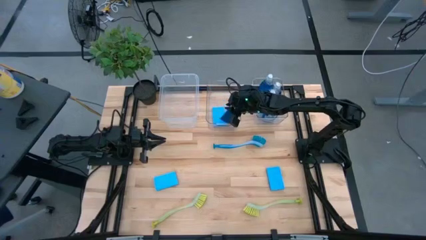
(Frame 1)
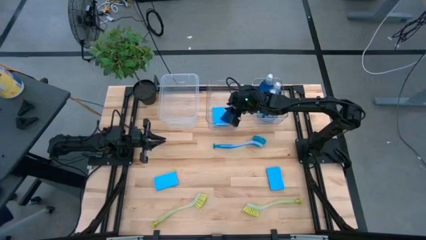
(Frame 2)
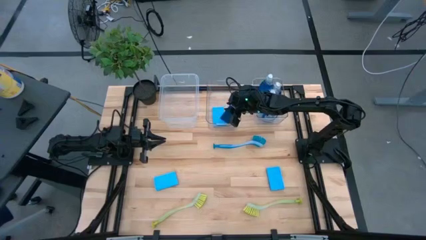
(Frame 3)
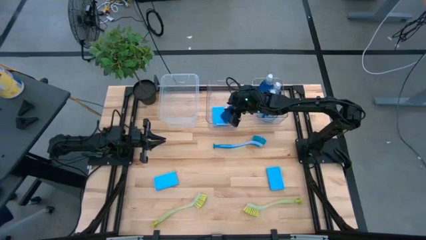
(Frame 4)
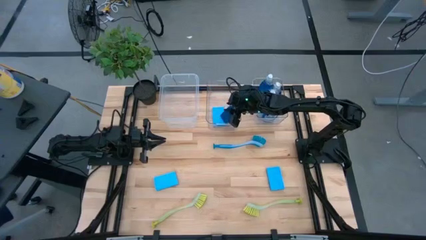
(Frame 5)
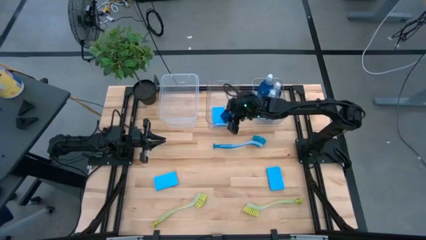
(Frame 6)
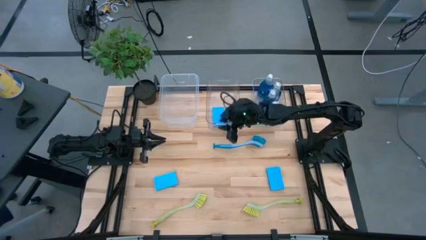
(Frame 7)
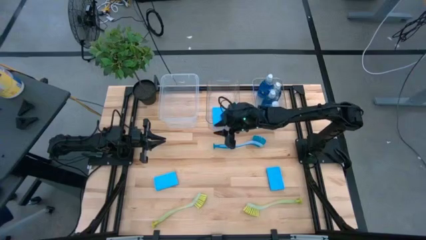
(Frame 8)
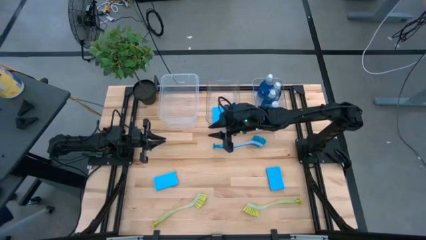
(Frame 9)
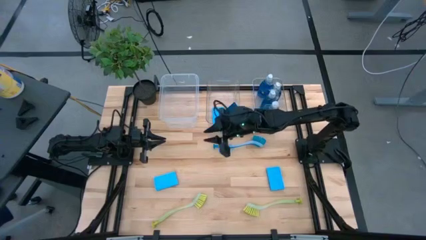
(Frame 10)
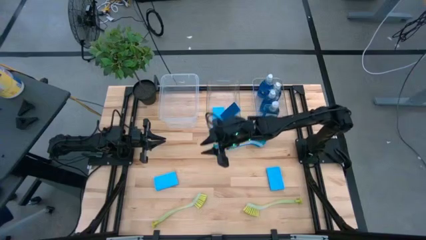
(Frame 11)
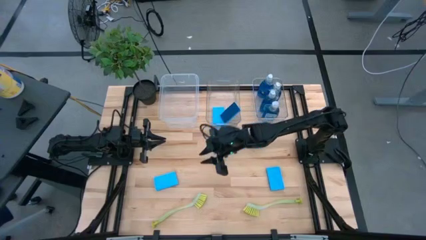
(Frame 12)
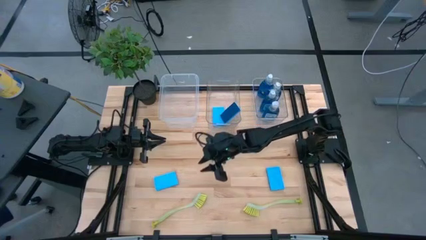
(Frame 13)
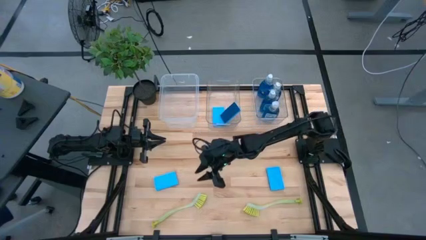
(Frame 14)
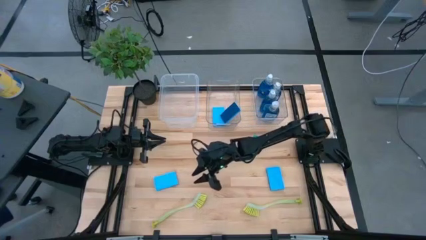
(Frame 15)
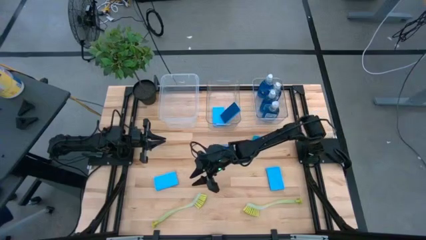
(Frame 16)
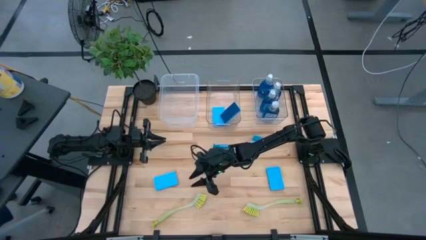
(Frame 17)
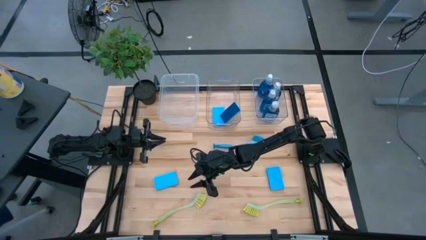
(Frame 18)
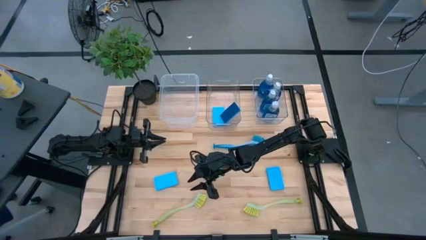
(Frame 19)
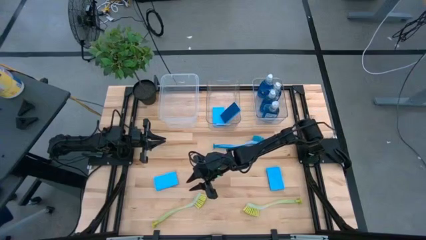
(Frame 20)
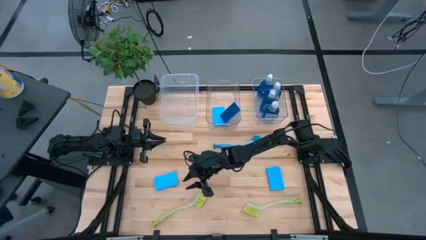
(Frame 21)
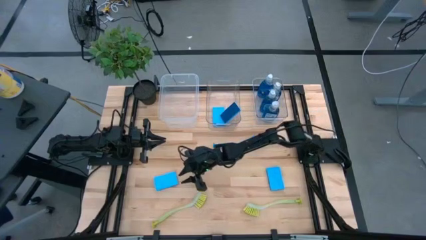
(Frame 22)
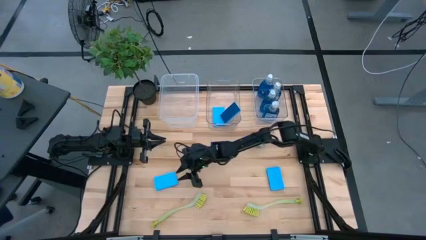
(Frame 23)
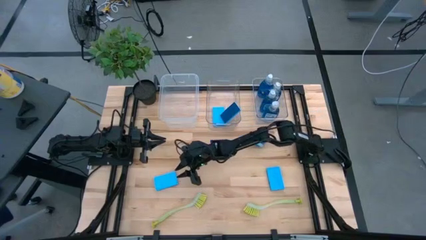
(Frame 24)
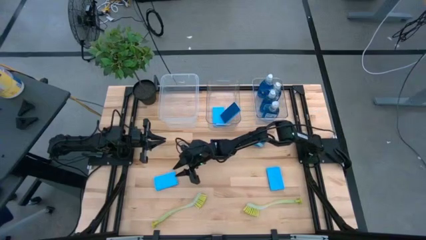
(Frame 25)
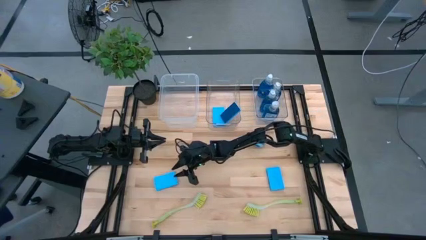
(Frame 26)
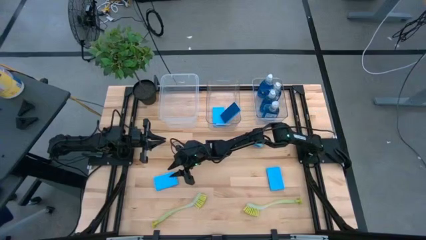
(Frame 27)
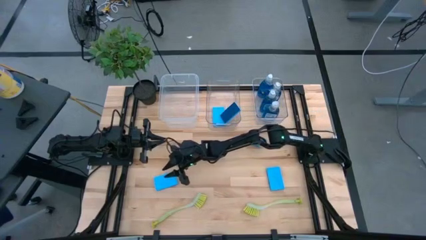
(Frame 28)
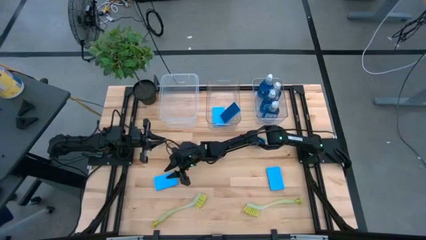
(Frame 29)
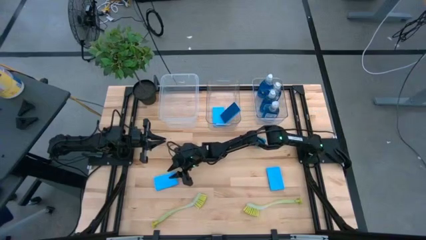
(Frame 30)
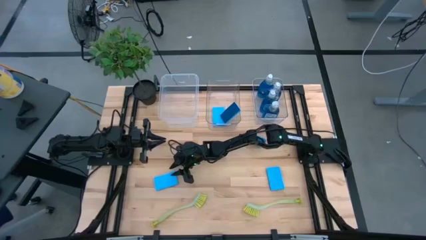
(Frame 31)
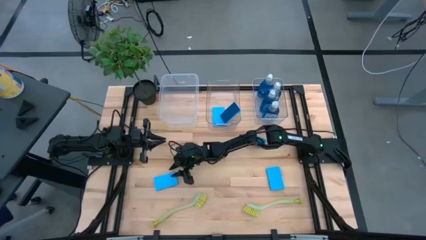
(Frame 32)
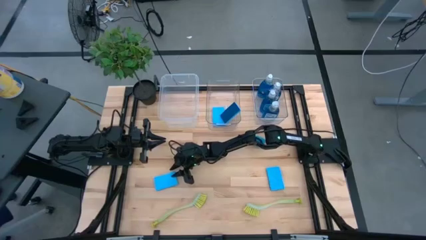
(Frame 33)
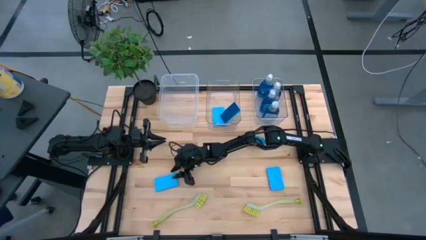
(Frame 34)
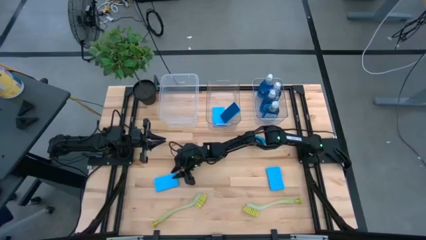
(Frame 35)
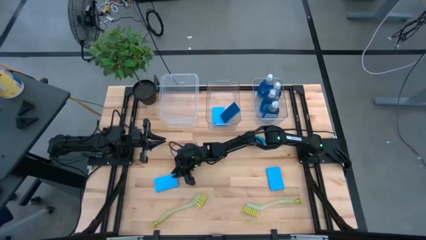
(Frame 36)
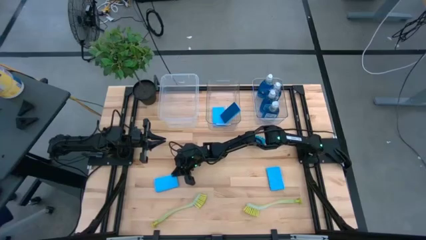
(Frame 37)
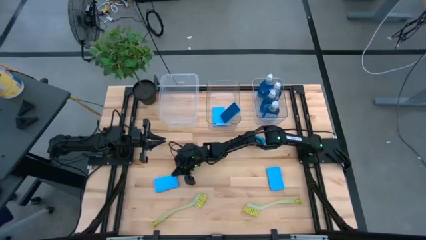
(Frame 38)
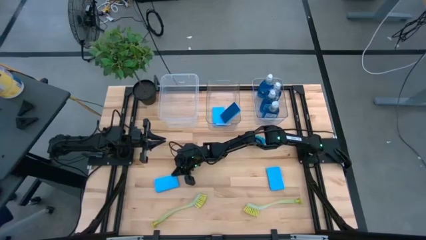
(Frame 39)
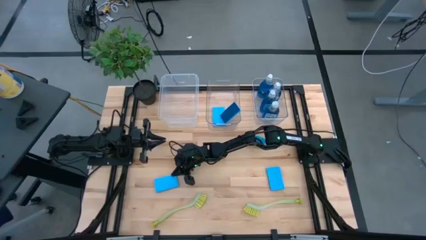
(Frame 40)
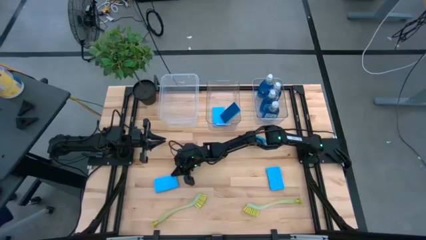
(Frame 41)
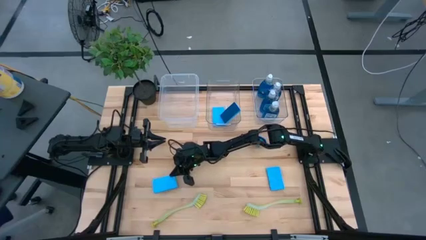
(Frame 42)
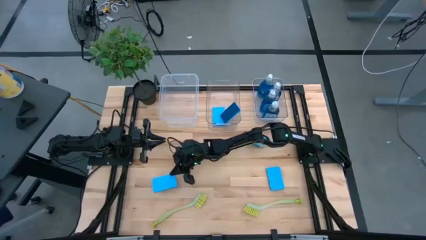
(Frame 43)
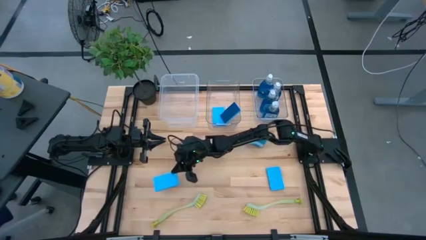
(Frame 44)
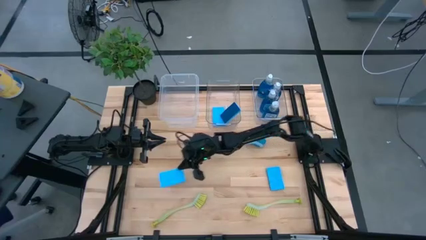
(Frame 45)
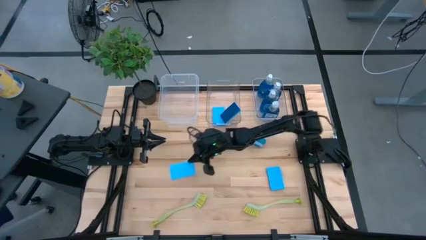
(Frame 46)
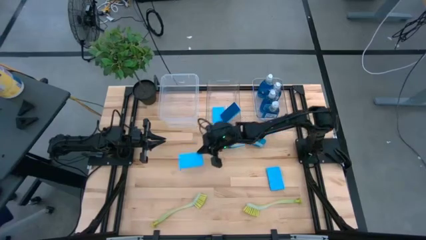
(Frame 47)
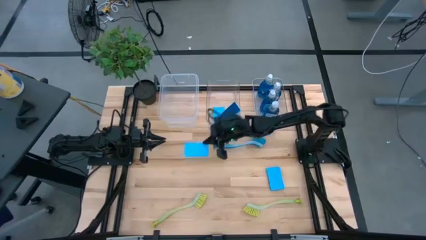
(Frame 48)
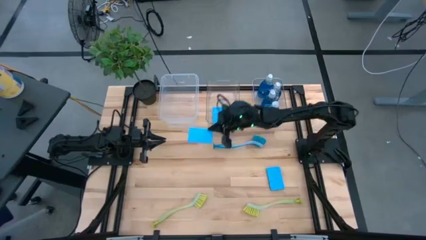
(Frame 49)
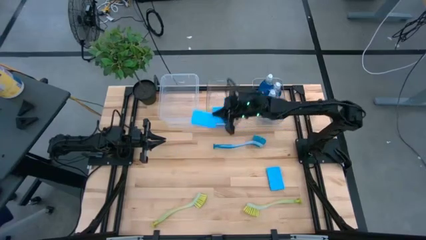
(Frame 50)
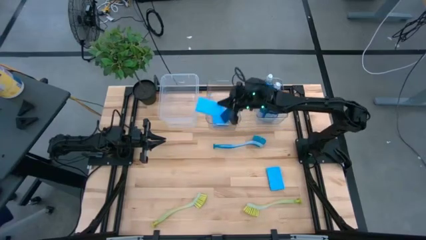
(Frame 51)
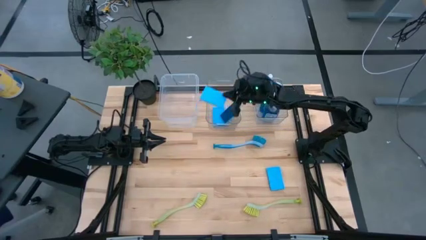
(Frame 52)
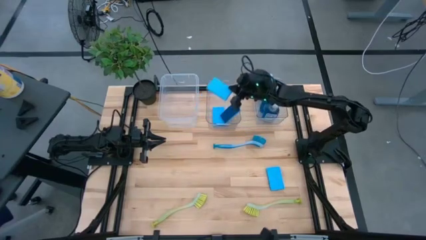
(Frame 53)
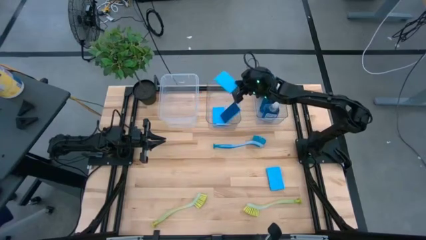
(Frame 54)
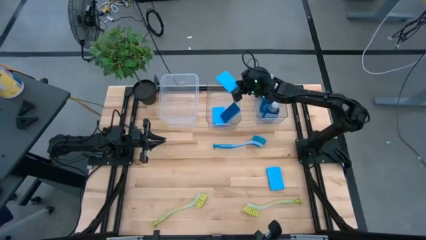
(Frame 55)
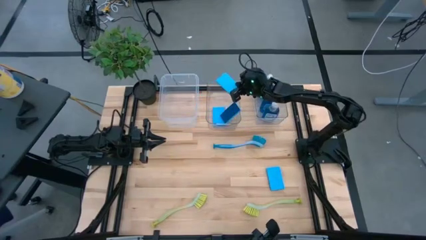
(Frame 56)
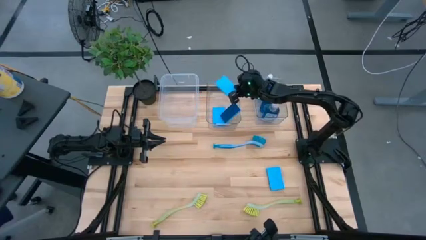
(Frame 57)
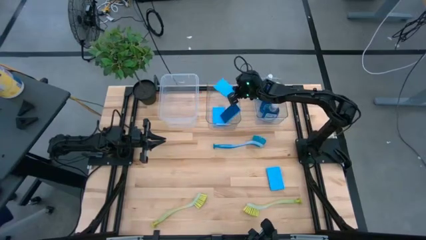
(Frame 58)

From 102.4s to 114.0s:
Task: Pick & Place Kitchen Sink Supplies
Put the blue sponge into the middle transparent bin

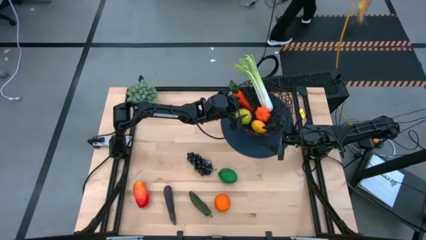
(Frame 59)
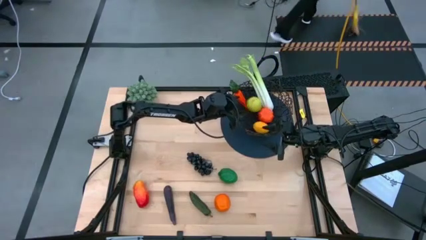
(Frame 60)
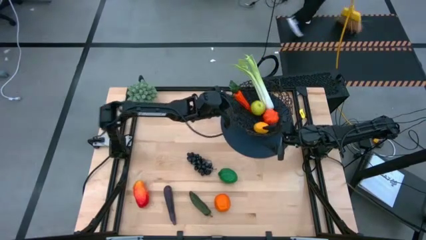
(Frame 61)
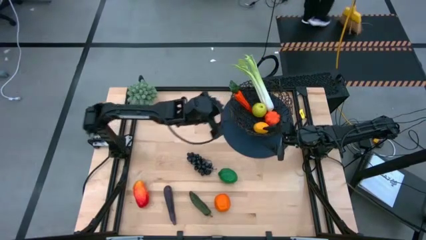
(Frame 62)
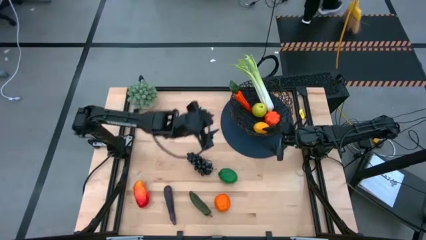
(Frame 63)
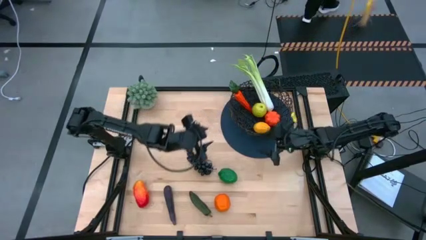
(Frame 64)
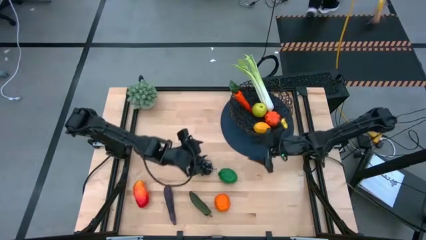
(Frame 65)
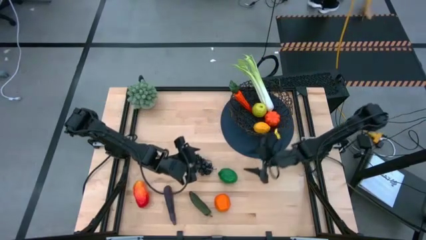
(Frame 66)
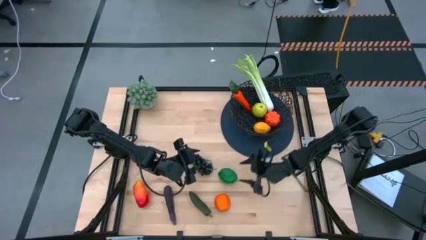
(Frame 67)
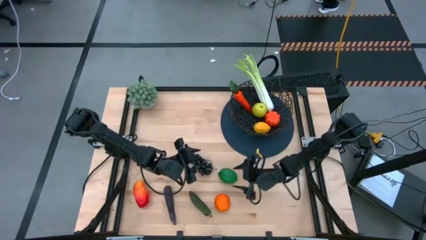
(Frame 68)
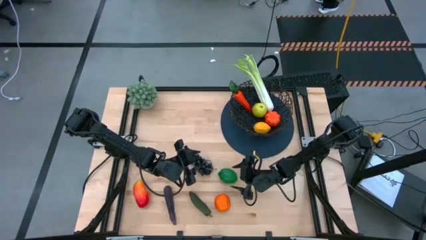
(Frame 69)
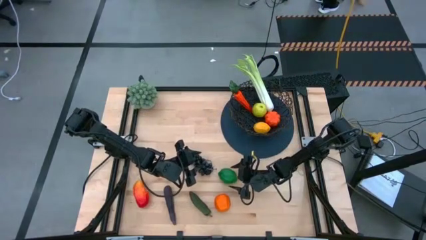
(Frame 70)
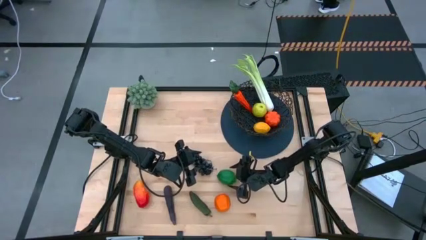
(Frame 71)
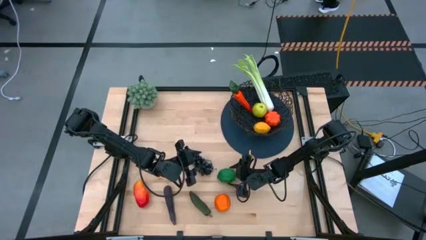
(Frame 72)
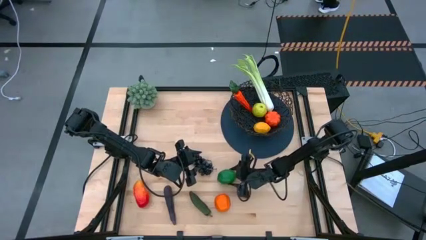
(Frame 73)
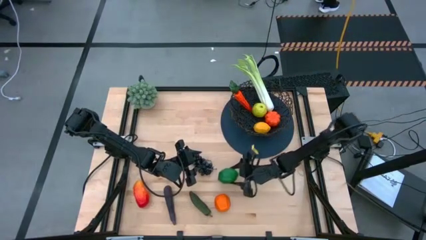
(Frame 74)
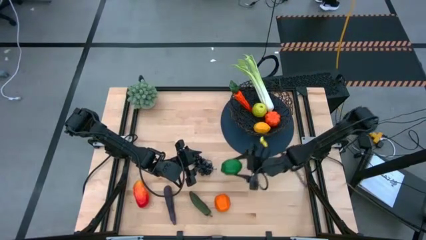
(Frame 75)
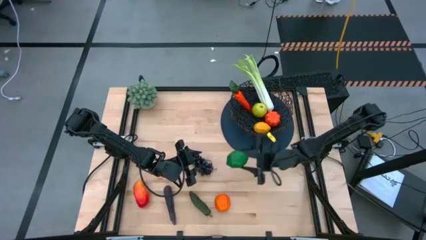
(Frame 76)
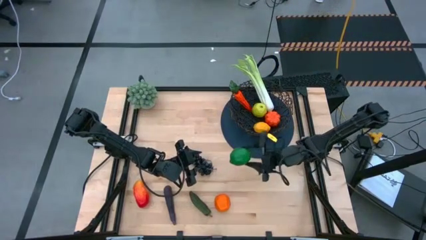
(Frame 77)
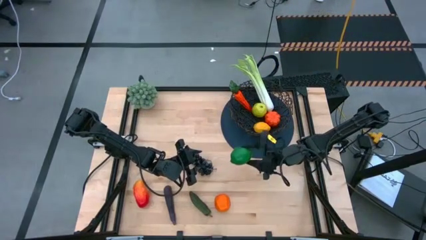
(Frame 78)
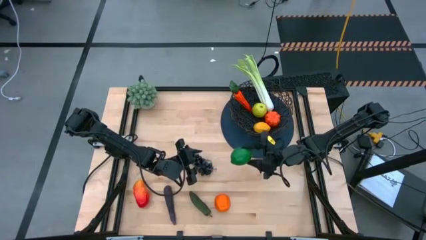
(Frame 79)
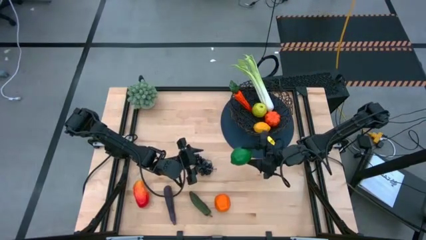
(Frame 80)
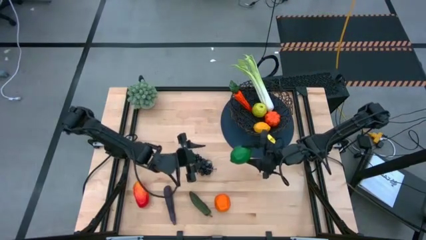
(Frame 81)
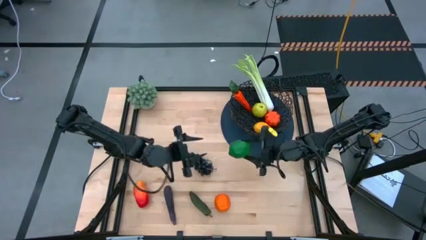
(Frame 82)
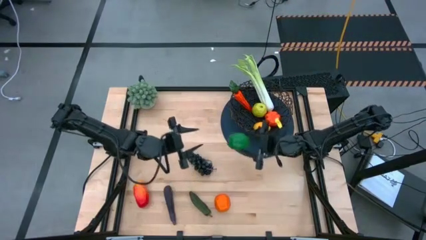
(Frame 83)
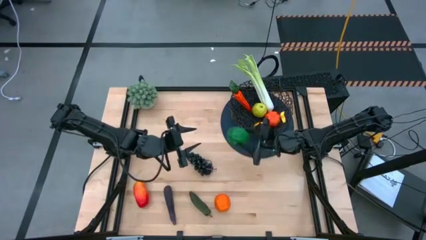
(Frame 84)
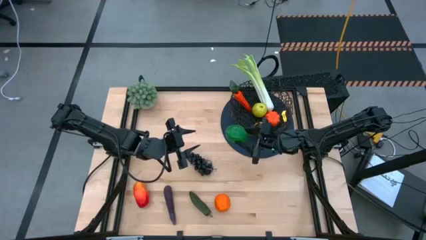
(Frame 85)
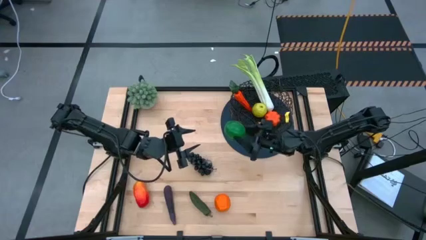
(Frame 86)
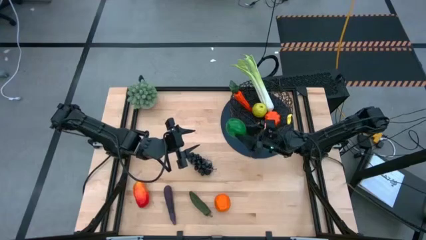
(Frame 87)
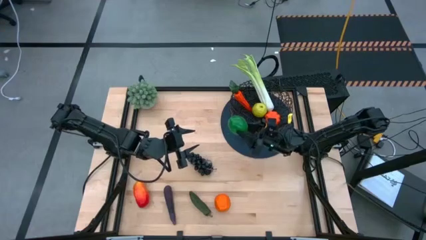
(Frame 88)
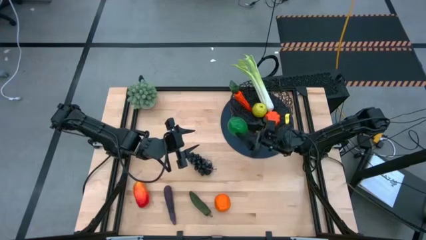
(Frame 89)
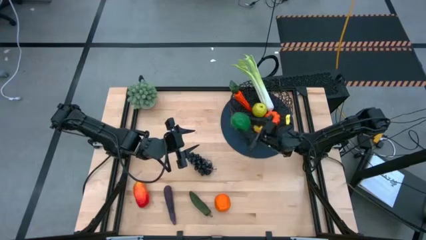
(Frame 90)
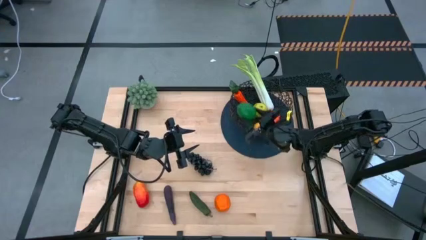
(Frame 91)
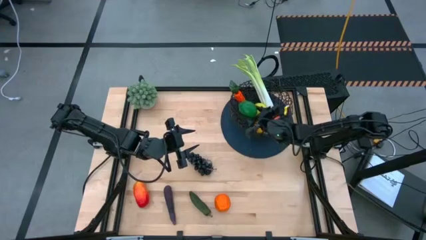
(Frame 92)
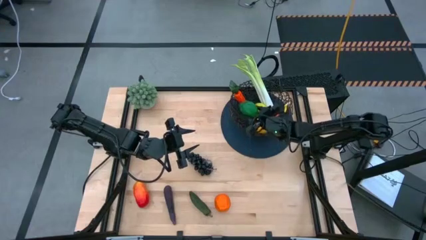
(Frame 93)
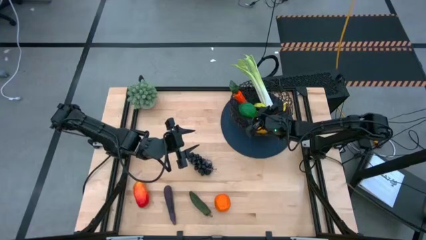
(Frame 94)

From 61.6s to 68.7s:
Task: Build produce basket
Put the green lime into the black wire basket
